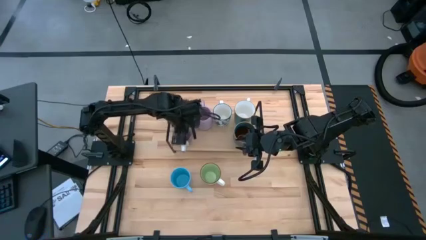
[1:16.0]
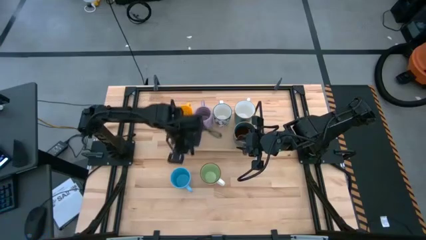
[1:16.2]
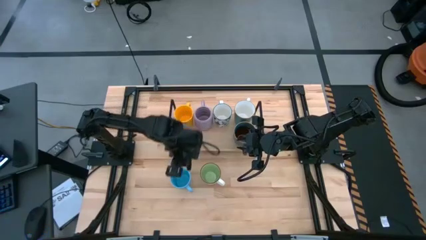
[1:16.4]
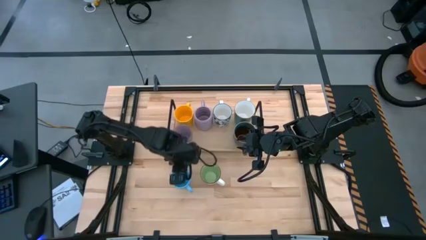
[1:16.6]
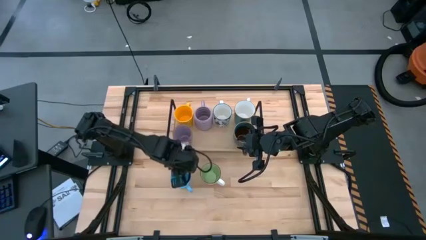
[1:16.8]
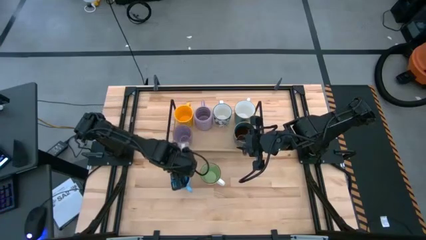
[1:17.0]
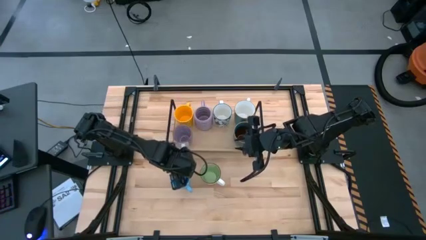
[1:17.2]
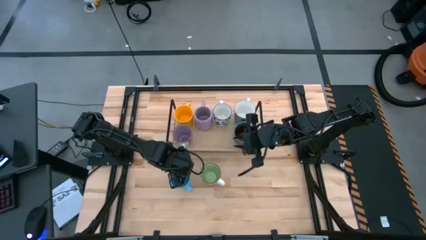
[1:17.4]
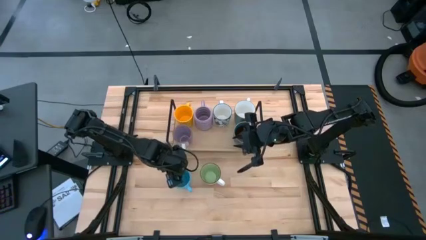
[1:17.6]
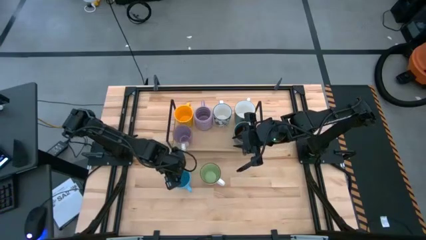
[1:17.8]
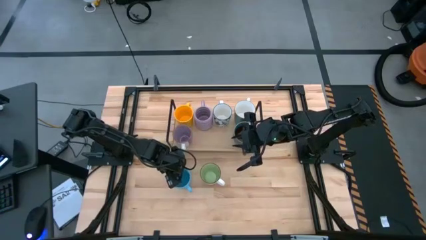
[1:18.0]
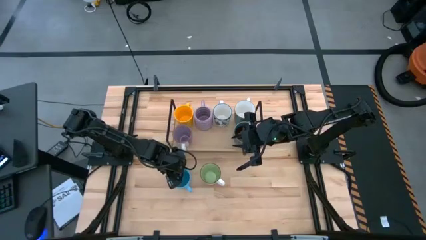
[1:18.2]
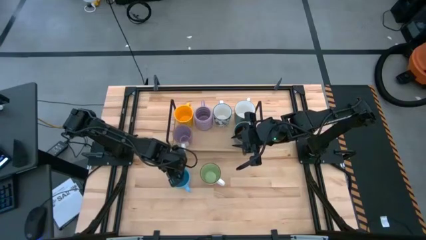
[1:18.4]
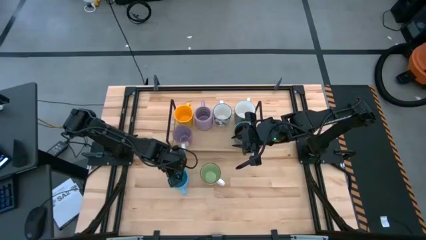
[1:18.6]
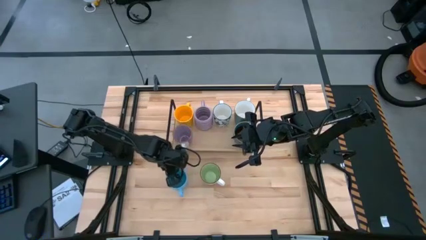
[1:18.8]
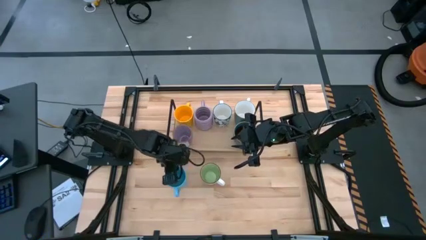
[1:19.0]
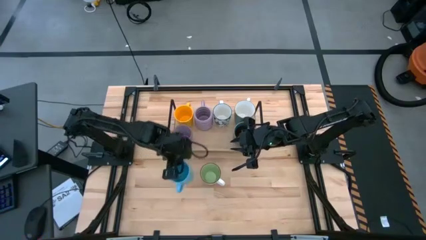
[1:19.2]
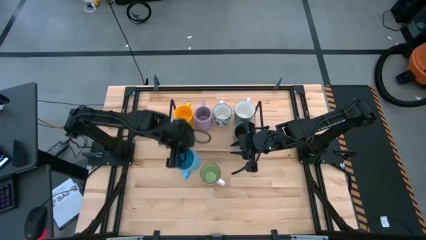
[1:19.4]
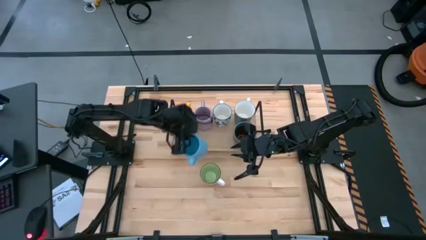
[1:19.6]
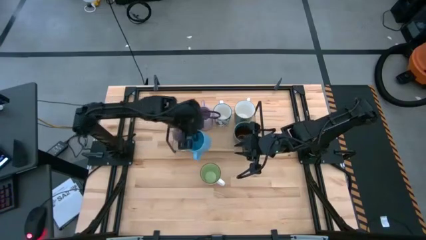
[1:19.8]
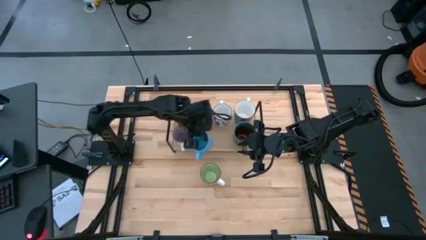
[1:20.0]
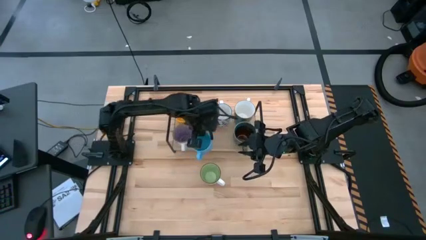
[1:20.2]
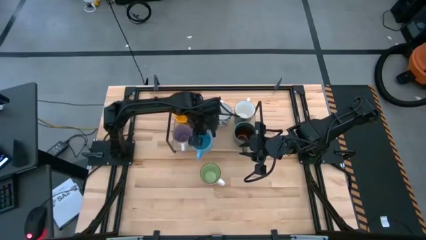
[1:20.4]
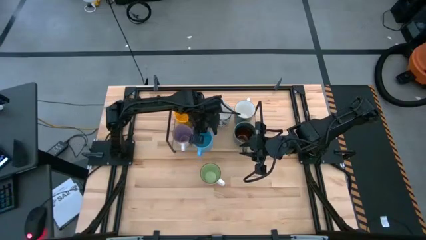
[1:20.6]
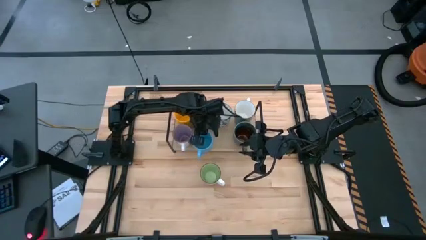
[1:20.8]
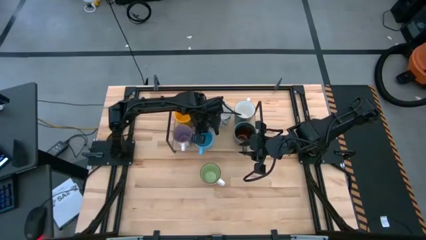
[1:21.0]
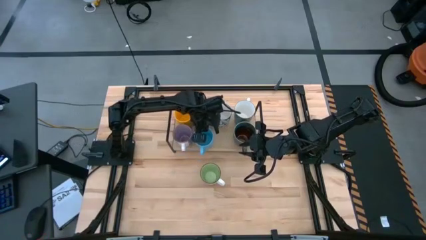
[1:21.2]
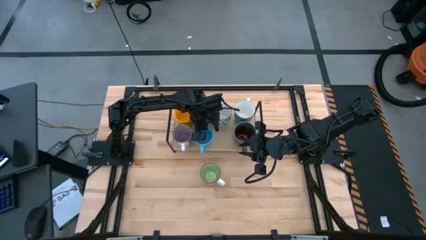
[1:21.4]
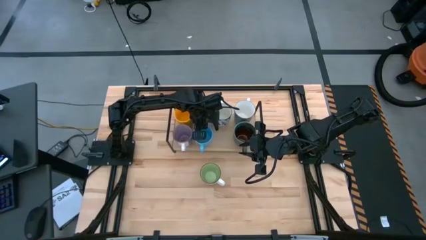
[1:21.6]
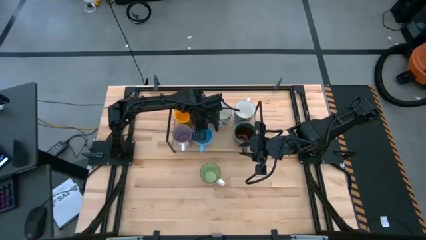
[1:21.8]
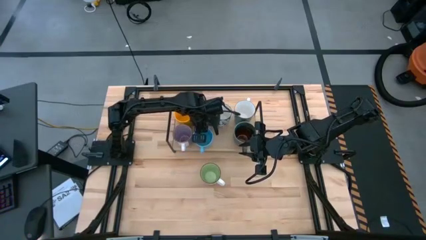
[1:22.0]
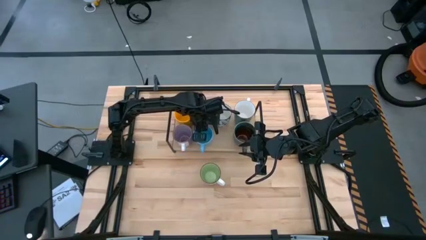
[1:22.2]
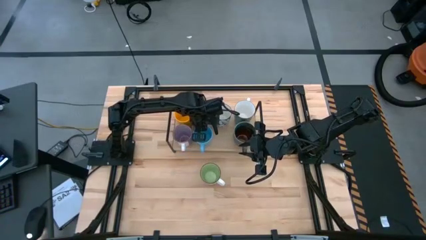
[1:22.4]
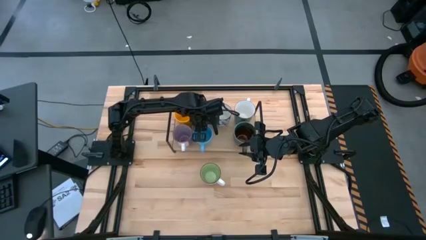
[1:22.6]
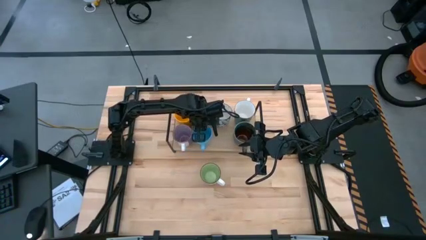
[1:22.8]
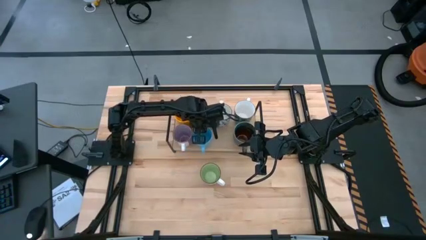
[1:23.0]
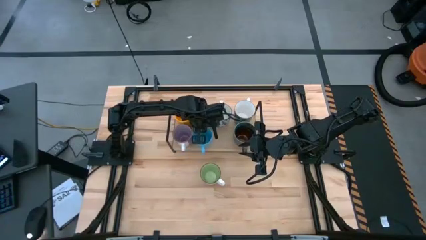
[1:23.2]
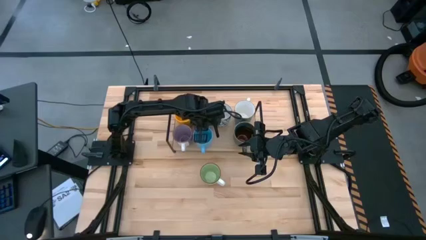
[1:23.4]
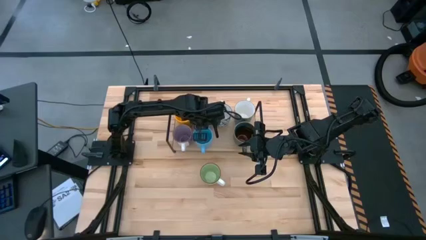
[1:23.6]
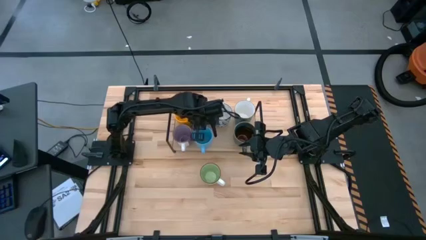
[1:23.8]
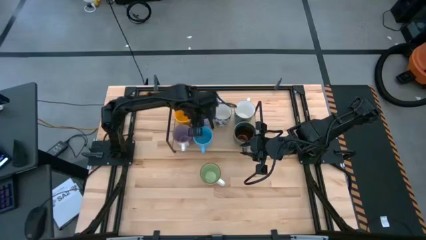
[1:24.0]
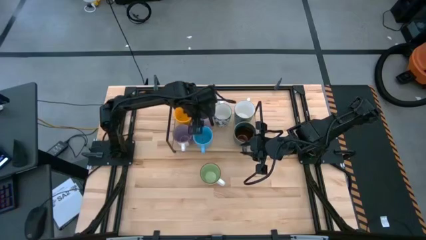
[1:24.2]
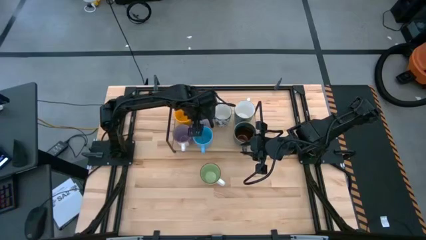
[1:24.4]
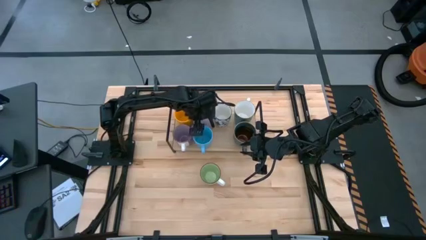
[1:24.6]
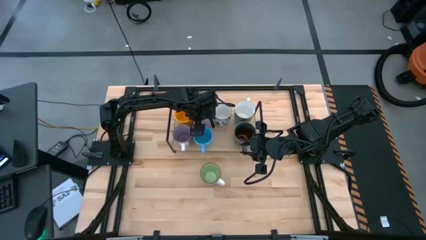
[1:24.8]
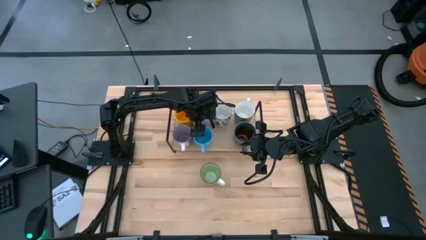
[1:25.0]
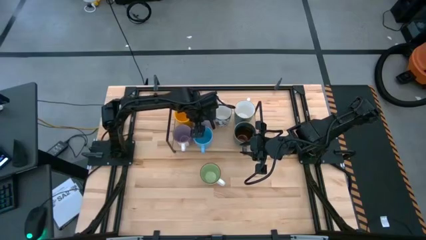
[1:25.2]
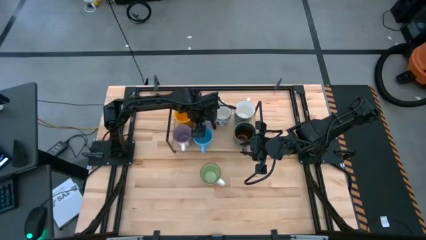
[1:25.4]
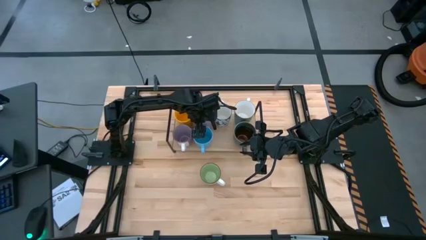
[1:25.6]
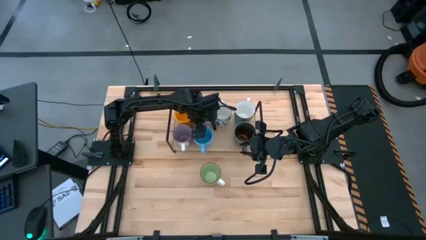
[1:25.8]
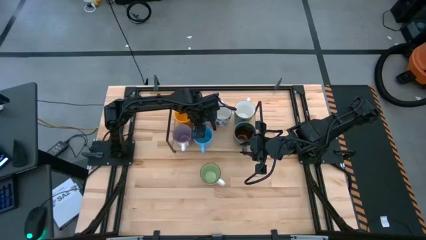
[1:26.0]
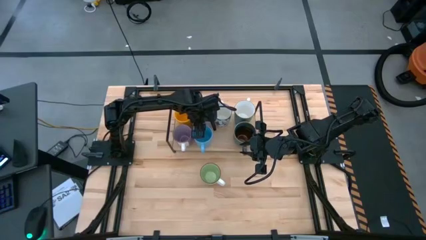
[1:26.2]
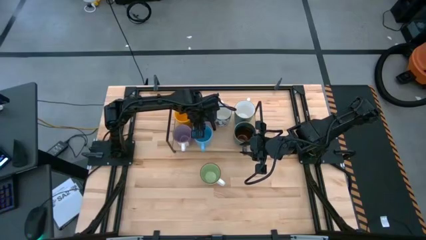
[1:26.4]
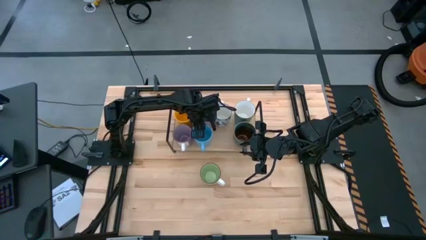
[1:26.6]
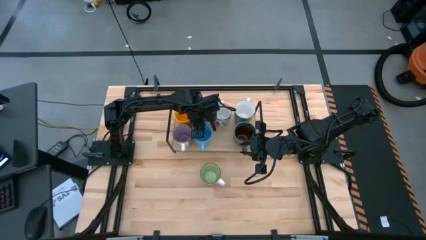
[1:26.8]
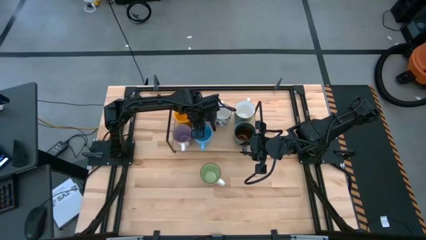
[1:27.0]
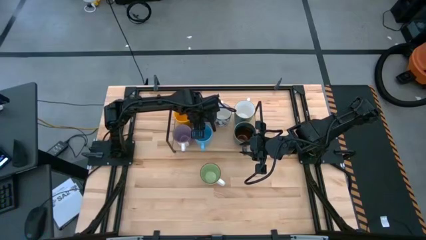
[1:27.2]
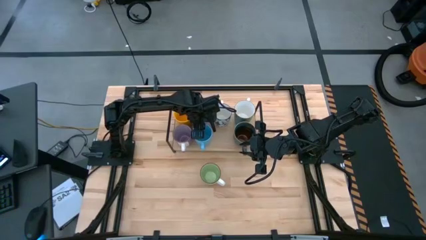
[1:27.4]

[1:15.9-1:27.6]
Task: Place coffee mugs
Put the blue mug on the shelf

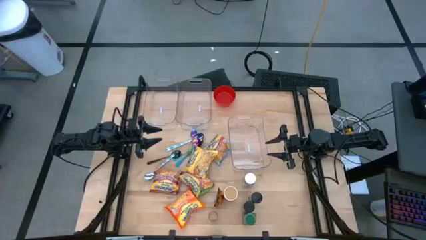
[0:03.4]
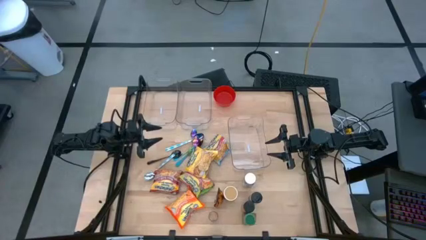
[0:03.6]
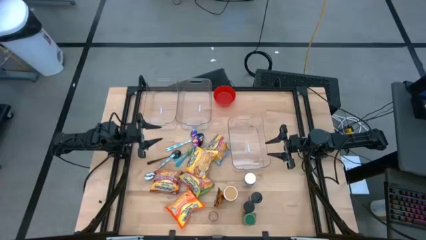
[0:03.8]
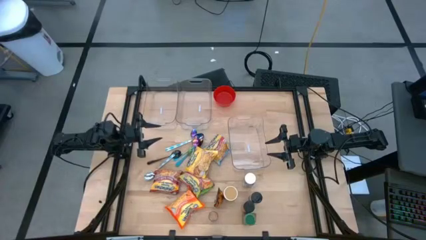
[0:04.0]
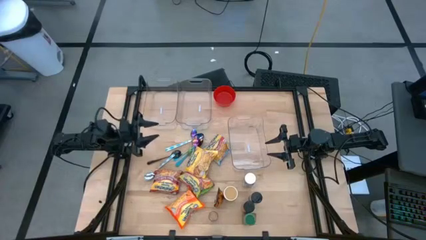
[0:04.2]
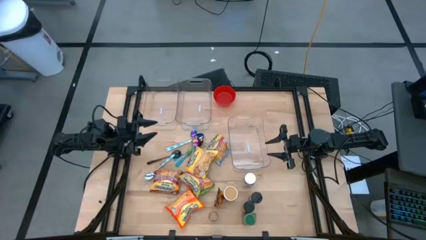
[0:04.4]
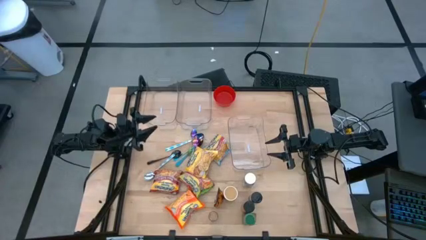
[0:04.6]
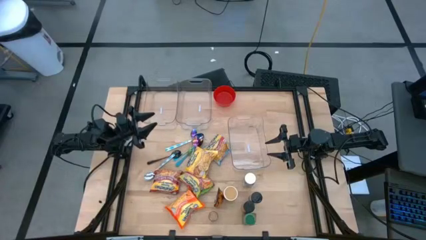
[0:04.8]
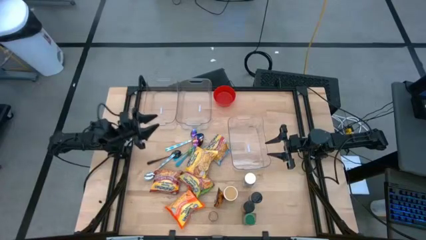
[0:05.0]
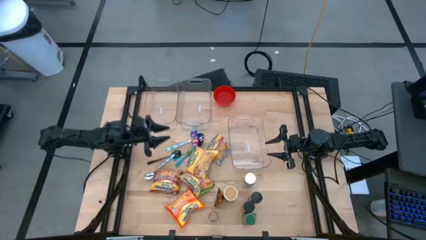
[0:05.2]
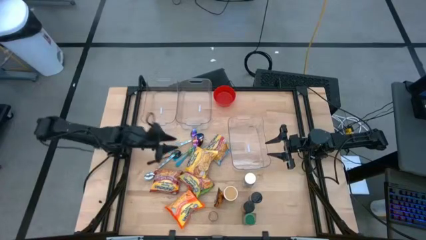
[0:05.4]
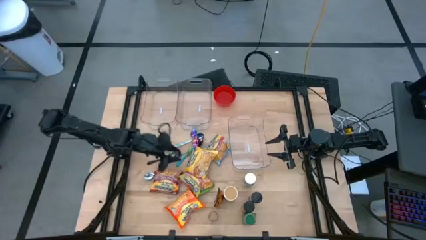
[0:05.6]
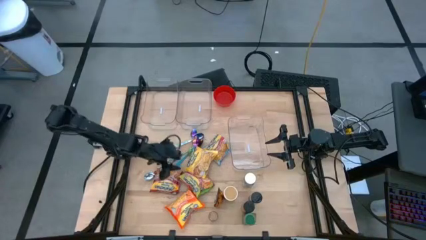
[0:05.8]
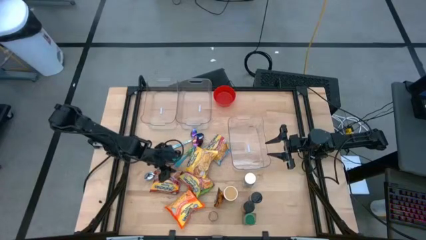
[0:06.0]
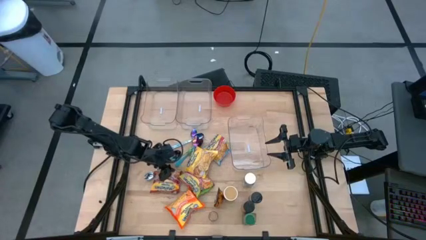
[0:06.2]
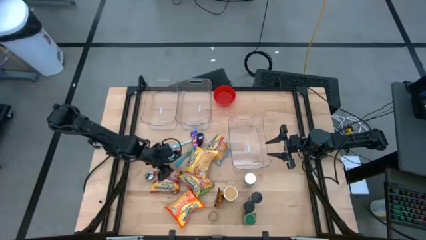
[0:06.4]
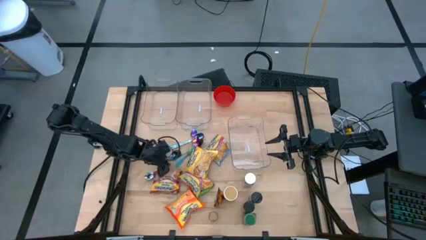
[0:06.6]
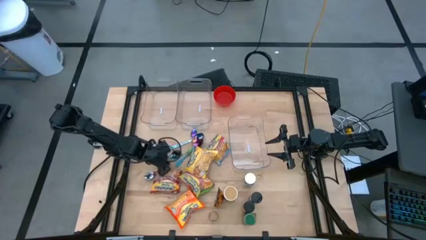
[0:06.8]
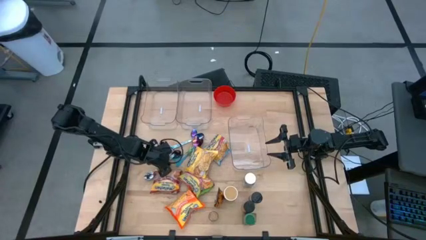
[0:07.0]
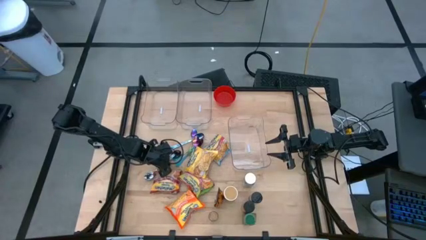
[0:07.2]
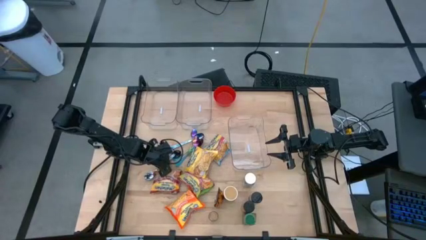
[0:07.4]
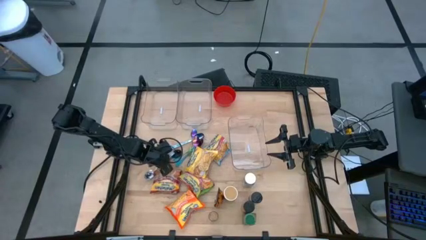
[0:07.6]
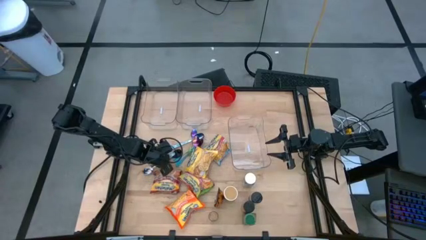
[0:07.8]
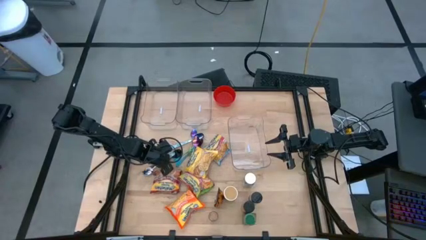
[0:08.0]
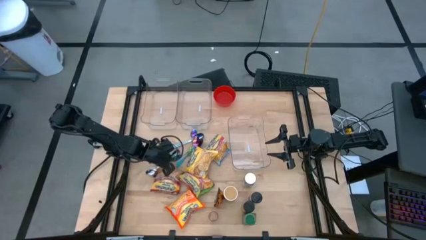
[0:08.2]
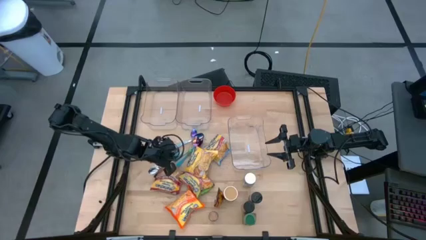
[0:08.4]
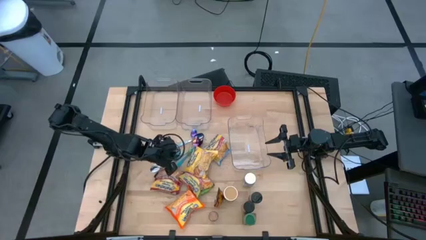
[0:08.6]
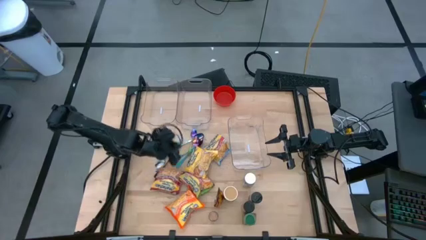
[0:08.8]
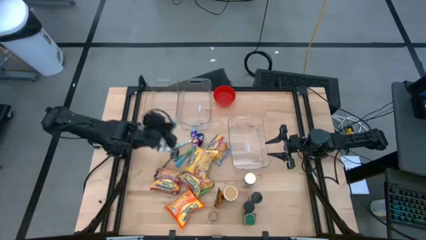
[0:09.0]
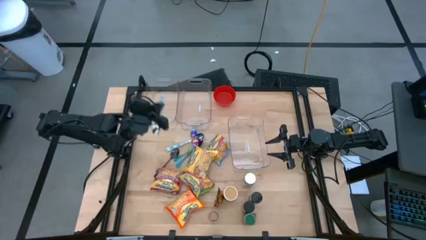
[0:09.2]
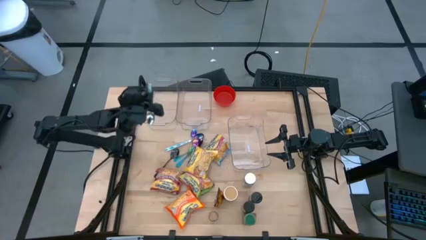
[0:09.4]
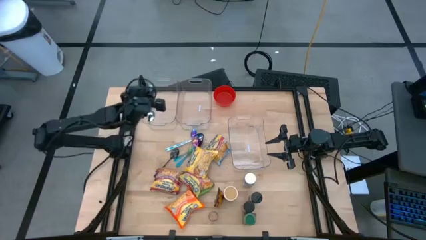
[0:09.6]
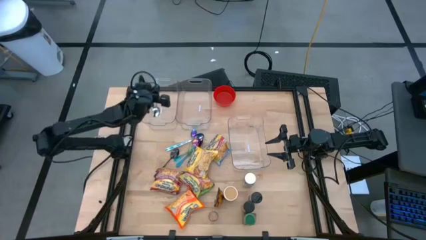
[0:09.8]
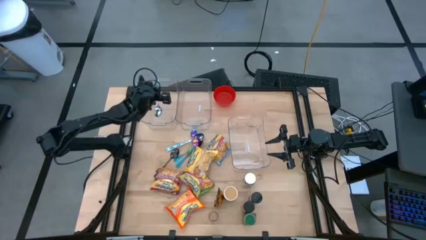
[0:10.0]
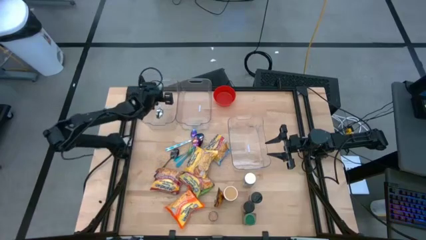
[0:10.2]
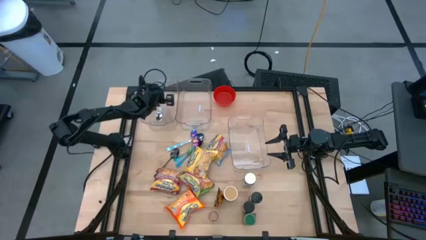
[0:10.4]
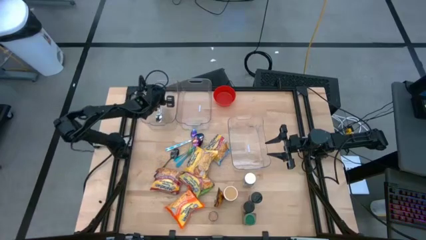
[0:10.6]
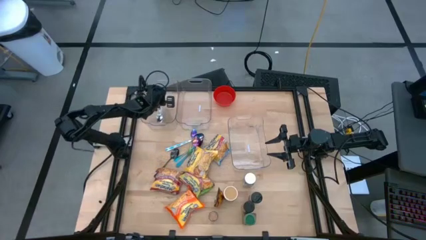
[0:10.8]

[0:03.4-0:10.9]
Task: Pick & Place Food Item
Put the bottom blue patterned spoon into the top left transparent bin
